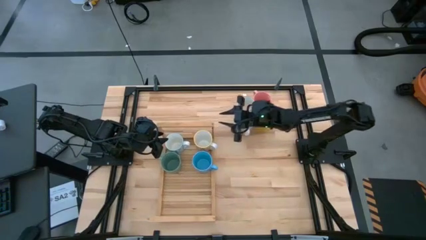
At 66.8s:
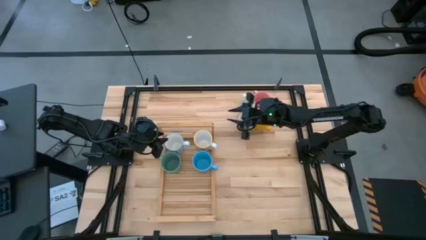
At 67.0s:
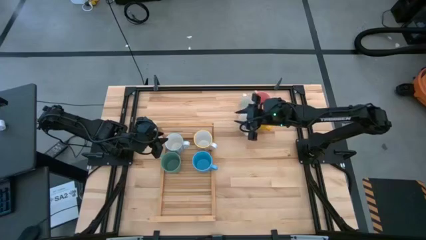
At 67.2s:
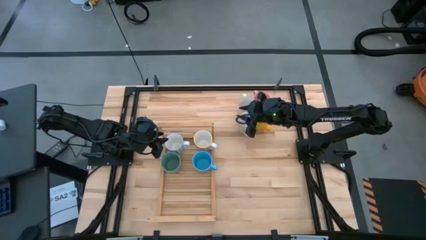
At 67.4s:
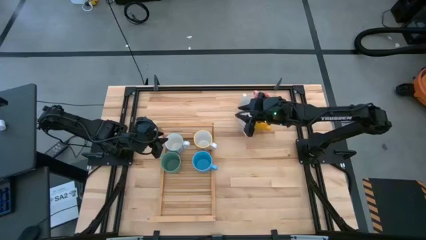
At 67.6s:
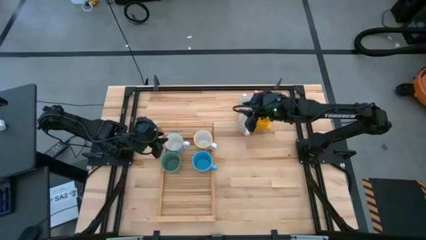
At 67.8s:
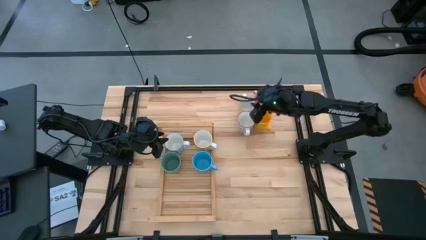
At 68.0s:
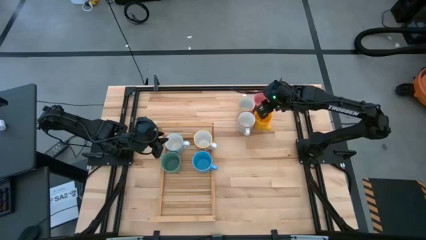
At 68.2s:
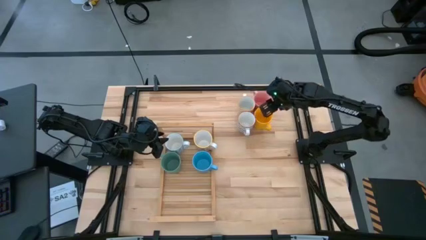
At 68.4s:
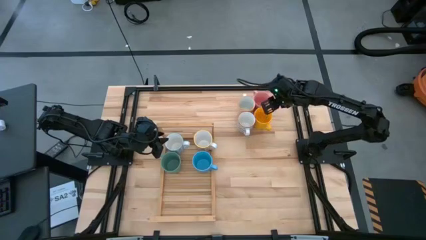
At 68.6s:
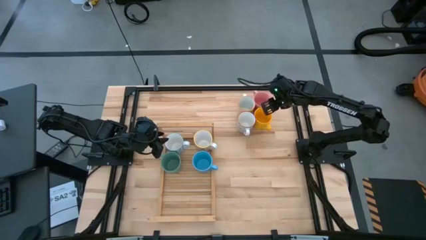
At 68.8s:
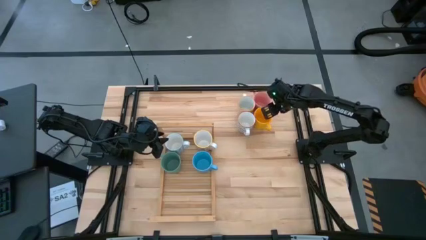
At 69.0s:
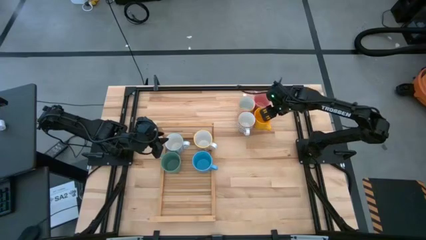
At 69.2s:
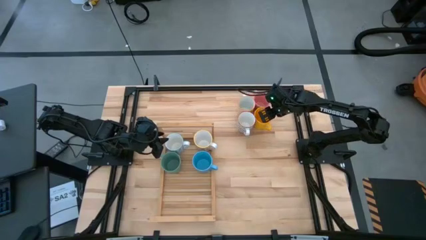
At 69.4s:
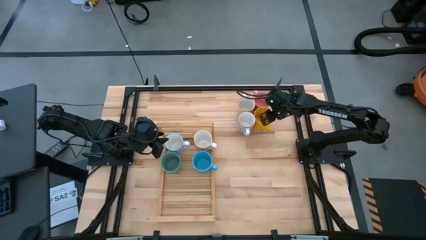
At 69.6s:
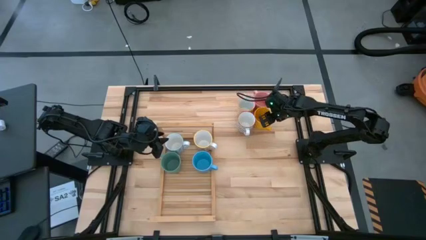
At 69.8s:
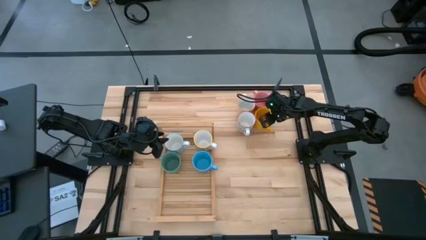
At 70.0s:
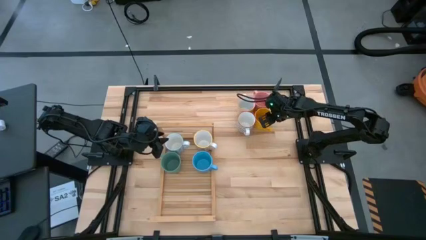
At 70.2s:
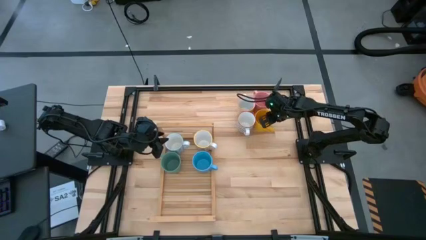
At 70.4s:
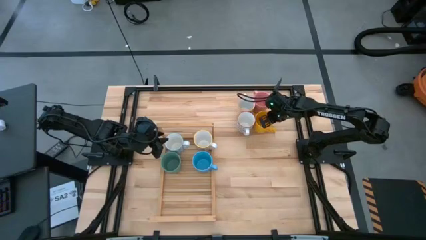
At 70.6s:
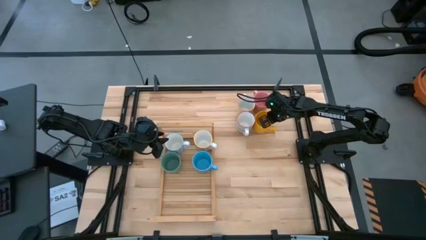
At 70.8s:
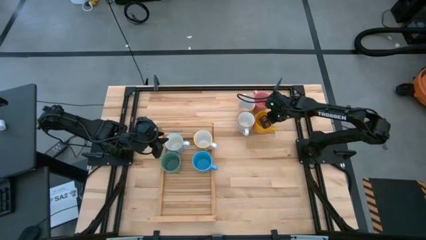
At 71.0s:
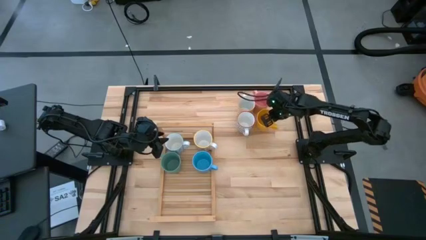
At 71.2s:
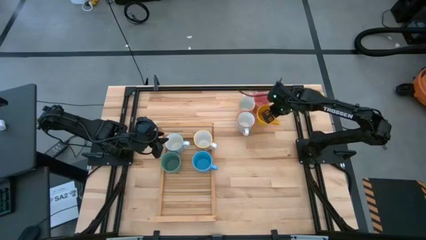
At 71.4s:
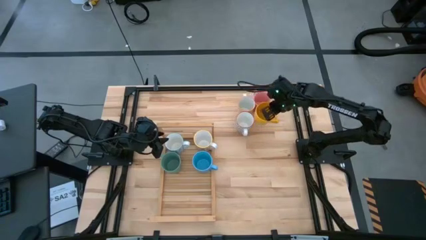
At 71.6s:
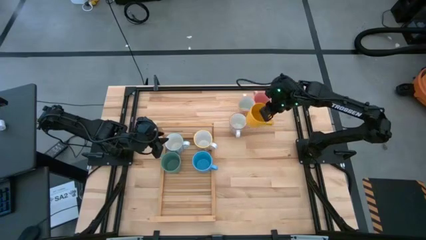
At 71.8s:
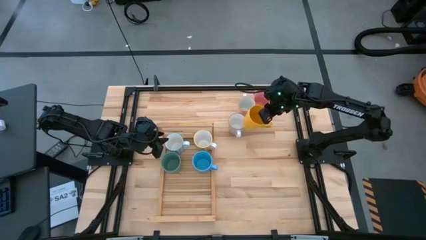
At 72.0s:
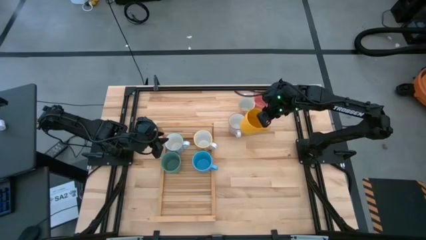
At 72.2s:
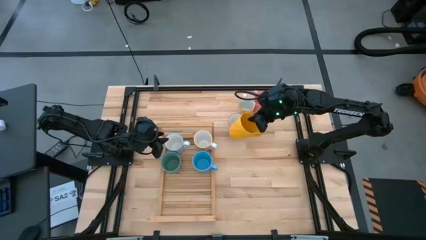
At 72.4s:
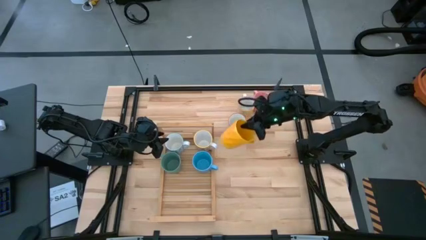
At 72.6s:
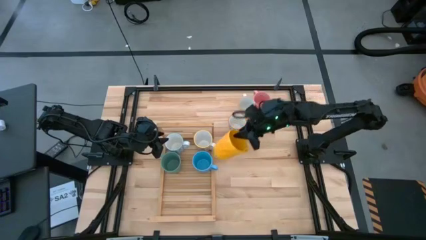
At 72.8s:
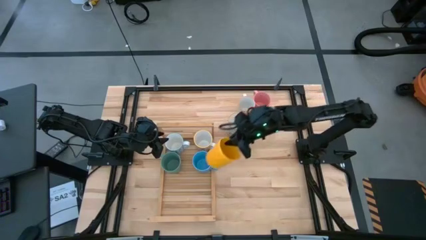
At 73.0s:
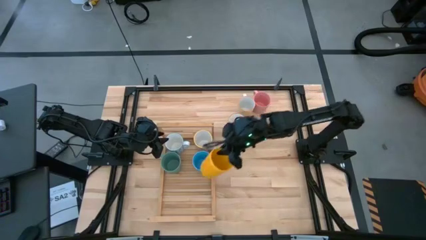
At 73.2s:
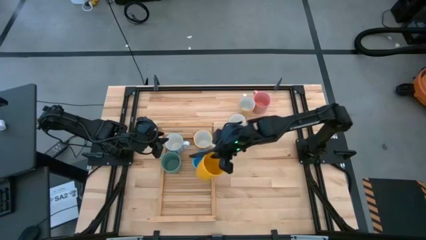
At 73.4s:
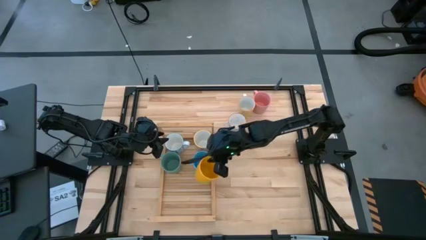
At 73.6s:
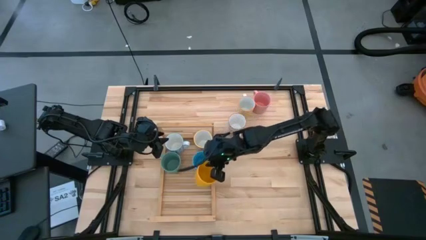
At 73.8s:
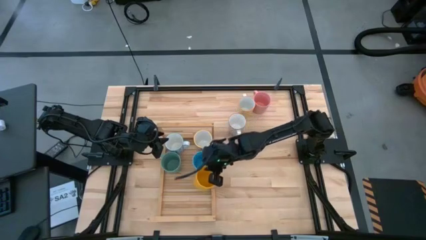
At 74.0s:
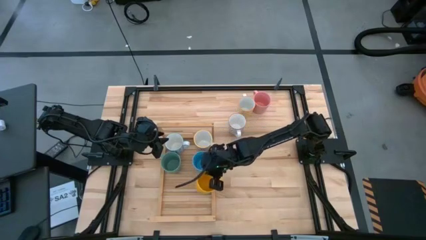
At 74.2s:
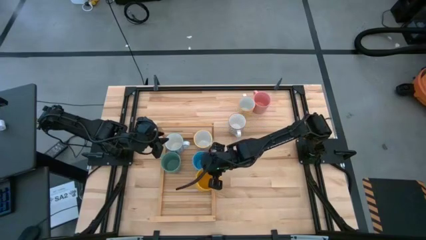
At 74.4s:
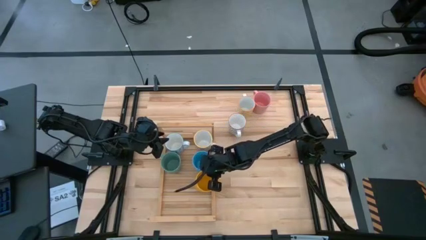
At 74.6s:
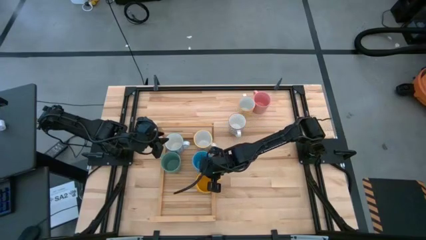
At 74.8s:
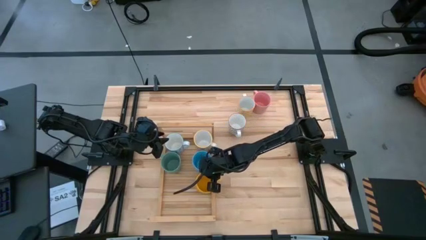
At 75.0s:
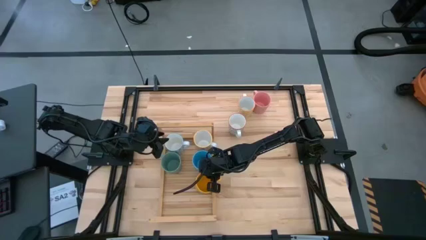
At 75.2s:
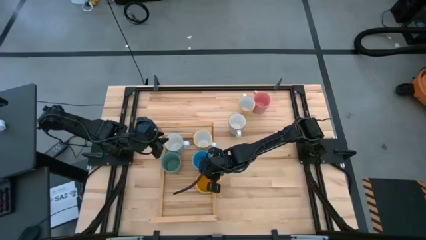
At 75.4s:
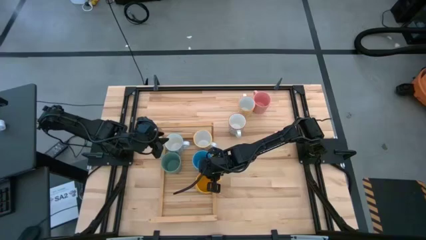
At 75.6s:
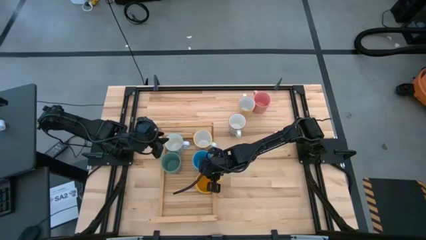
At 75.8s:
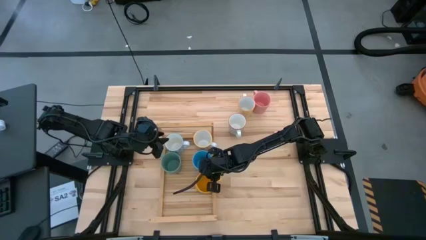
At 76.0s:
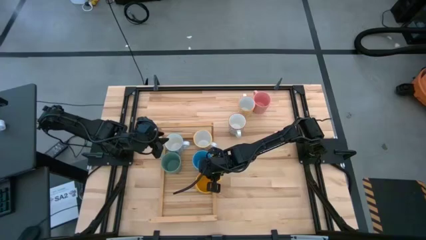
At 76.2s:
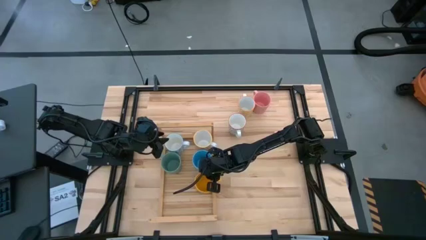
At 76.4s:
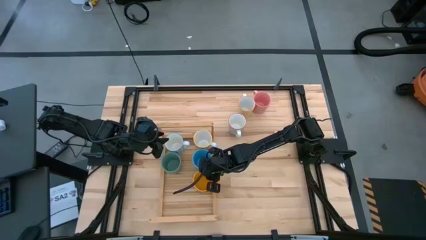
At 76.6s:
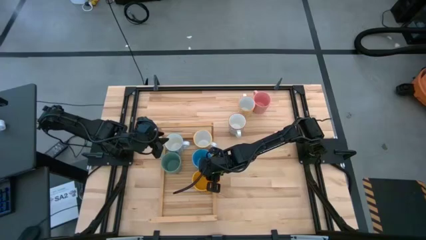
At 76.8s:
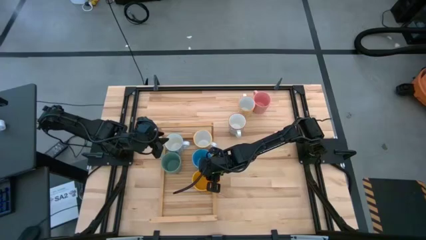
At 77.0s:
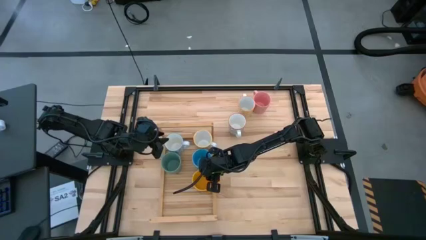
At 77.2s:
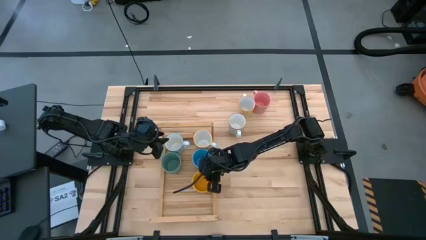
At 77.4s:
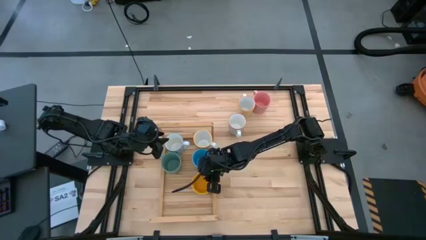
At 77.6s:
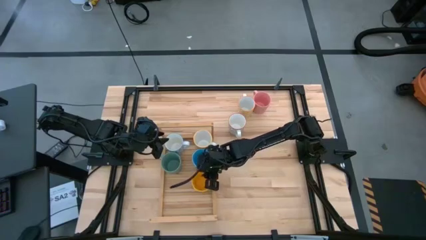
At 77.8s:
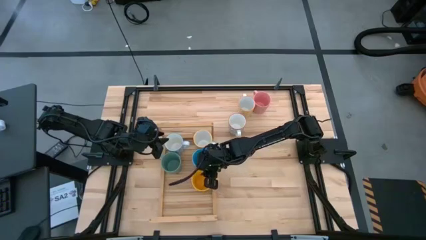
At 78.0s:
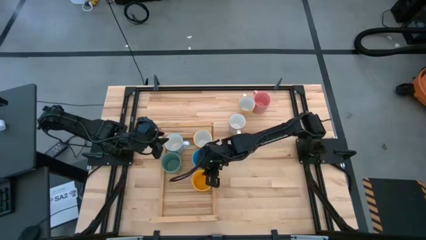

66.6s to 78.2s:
Task: Place coffee mugs
Put the dark yellow mug on the shelf

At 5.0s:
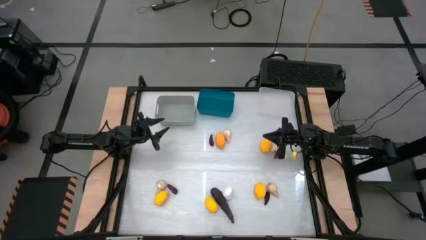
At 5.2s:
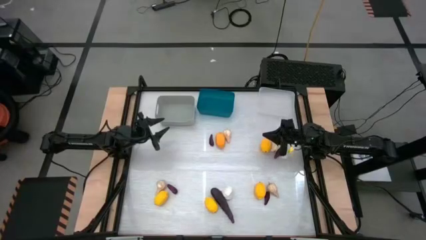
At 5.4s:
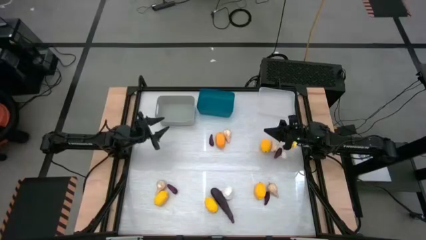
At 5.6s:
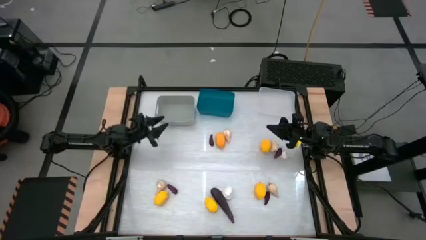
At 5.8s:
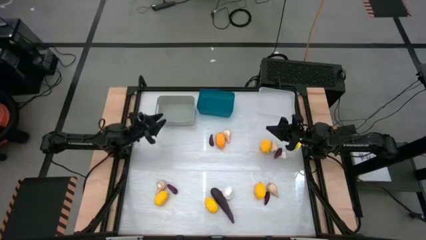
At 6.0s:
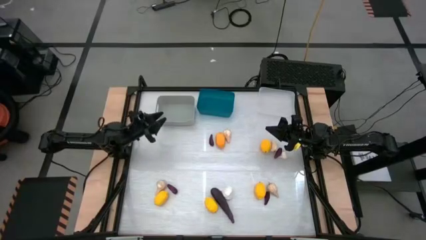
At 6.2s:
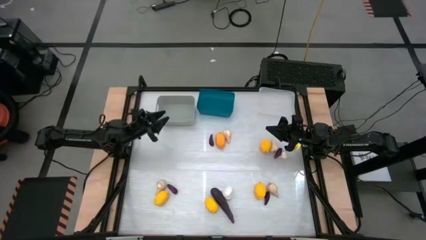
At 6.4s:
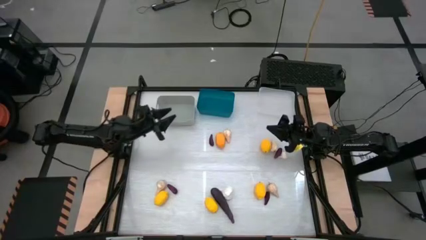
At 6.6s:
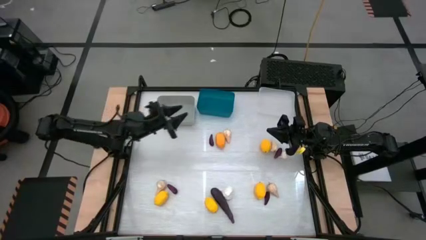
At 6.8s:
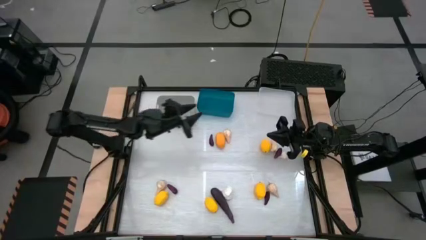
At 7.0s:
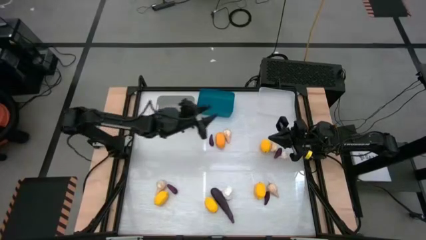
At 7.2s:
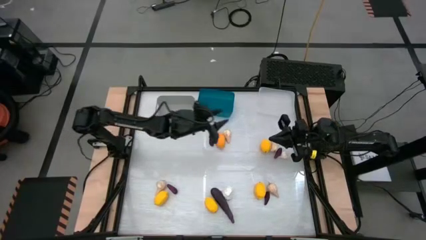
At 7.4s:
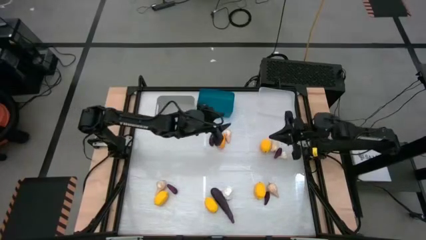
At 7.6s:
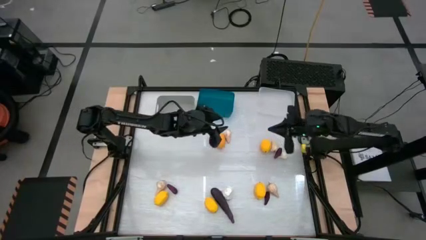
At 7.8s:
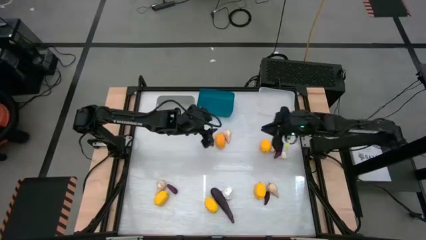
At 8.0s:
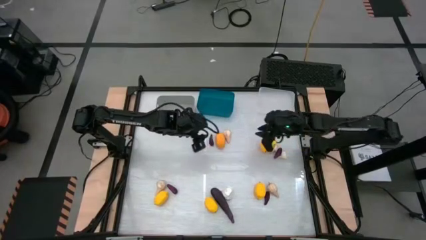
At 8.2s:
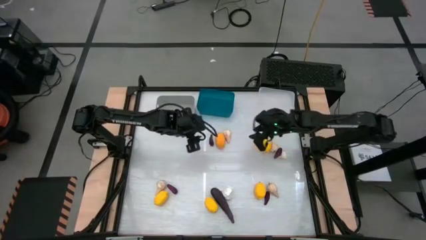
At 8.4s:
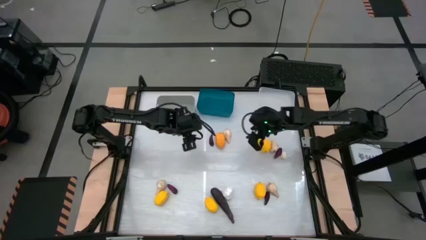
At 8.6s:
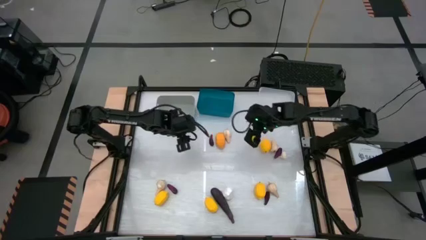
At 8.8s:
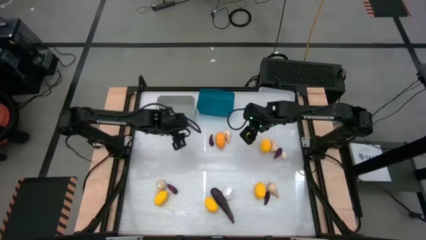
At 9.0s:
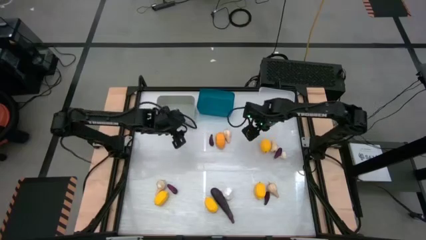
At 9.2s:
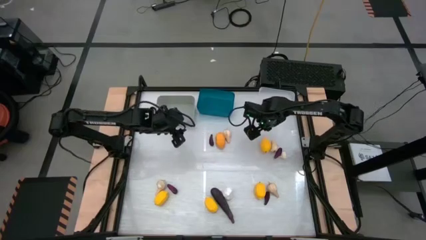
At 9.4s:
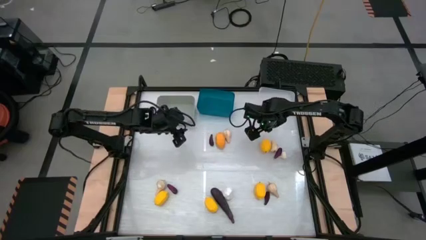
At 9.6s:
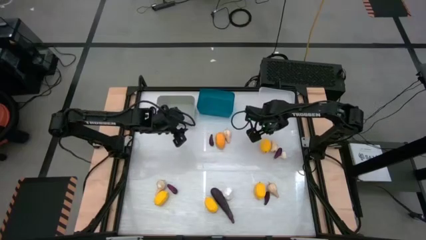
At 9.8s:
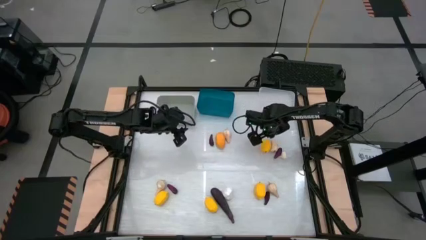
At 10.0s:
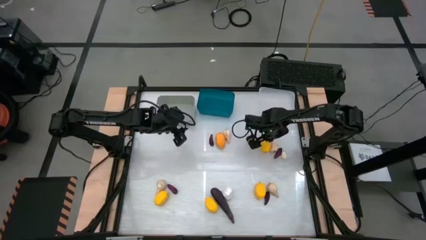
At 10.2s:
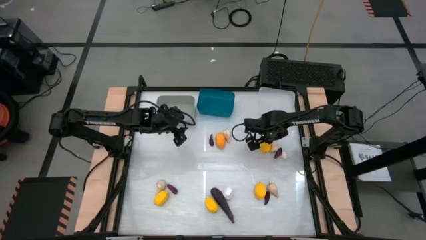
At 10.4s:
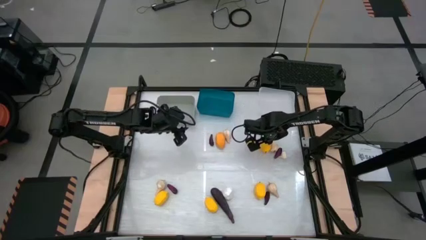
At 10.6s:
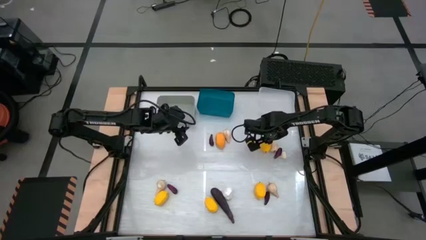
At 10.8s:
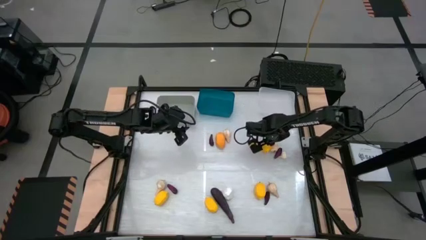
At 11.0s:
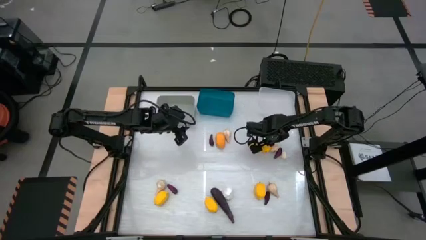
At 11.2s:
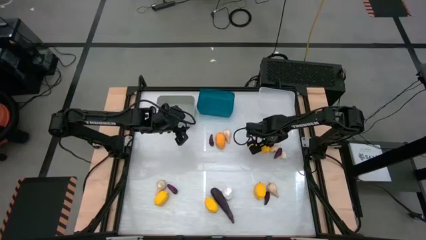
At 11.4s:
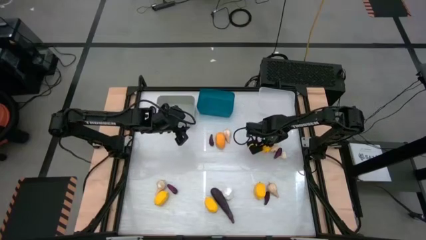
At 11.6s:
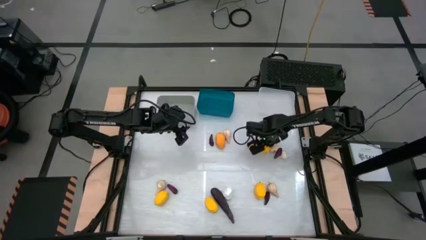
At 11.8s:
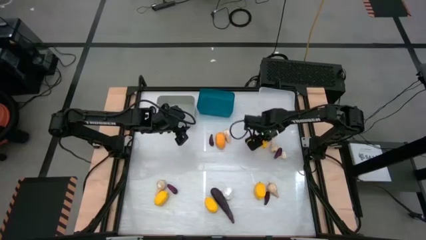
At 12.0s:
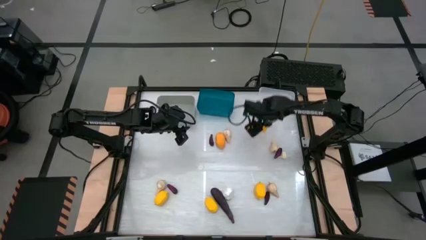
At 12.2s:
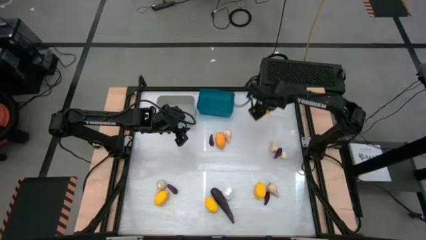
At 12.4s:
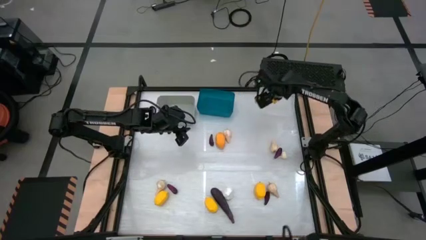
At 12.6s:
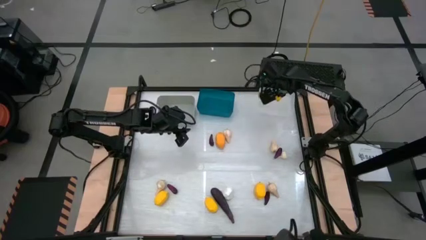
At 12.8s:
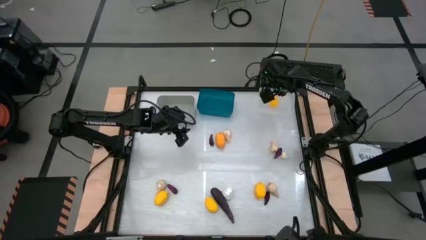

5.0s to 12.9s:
Task: Sort produce into baskets
Put the lemon into the transparent bin
